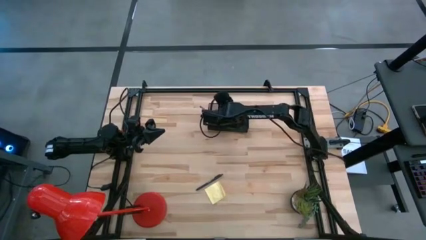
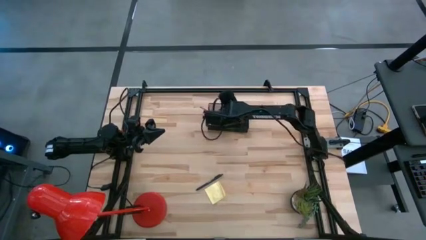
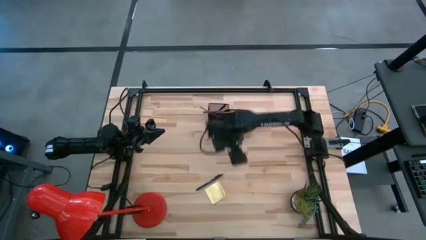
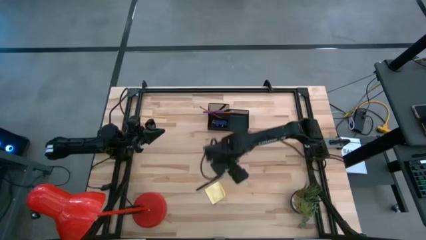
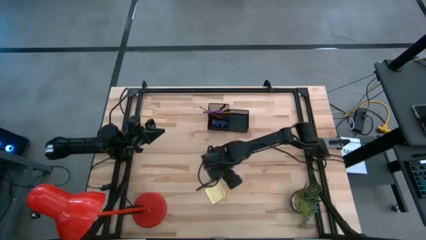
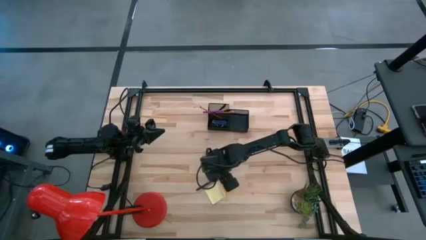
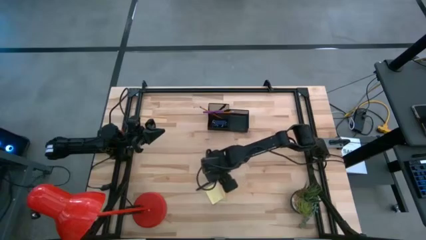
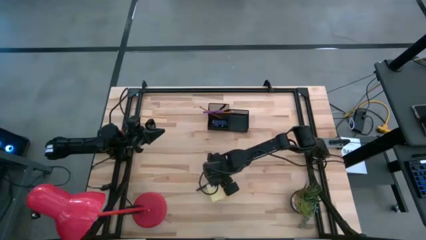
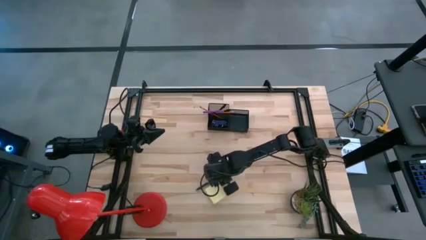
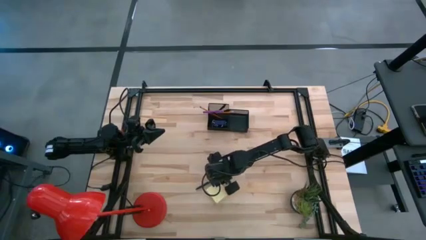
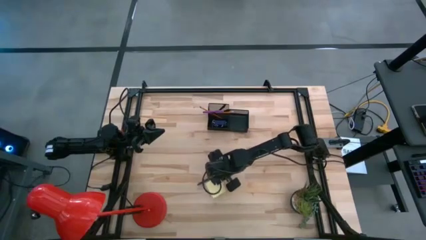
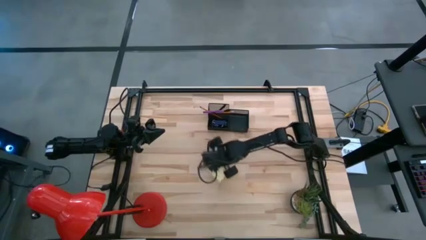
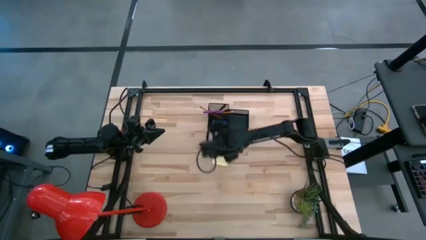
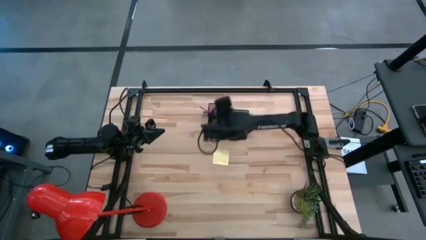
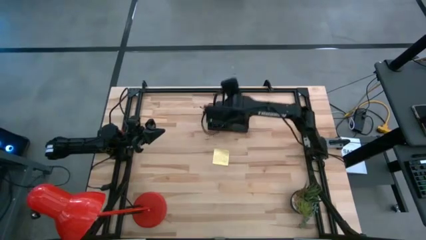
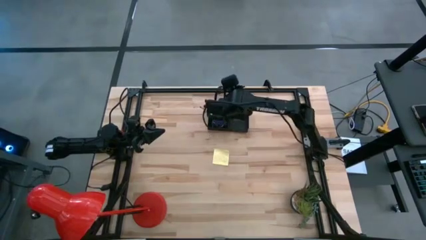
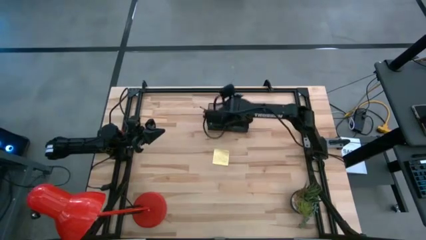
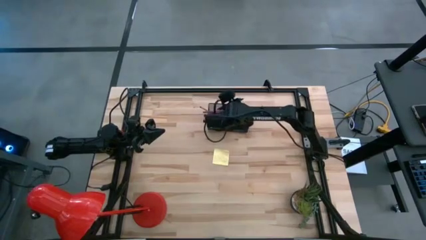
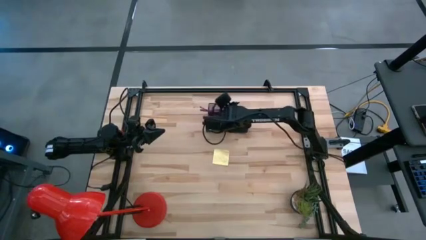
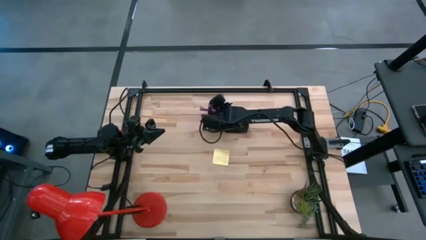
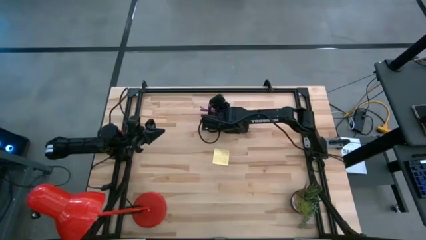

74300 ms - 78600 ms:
Task: Pick and place office supplies into organizer
Put the black pen into the desk organizer

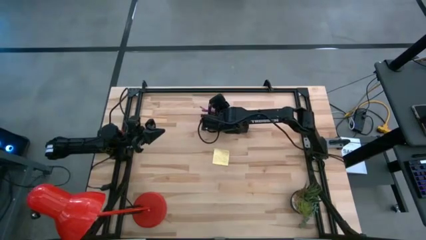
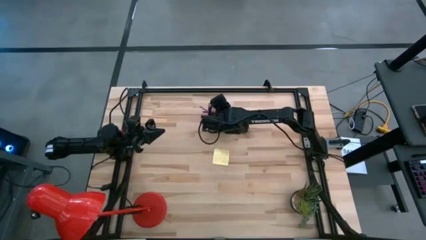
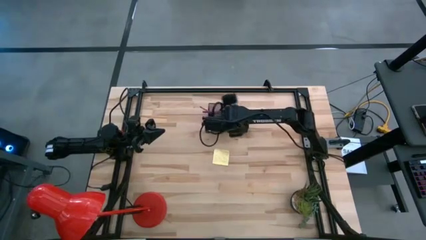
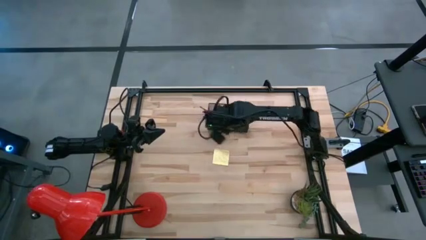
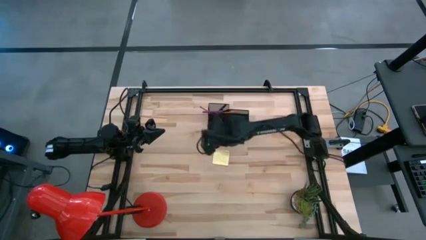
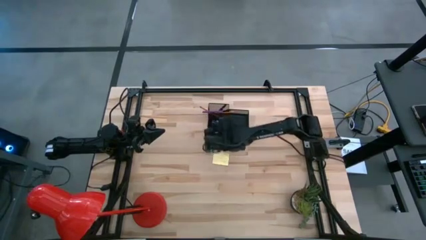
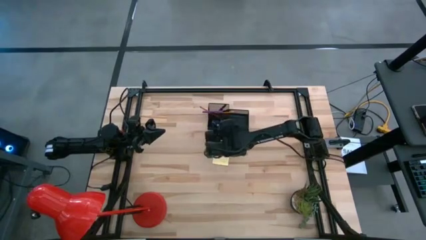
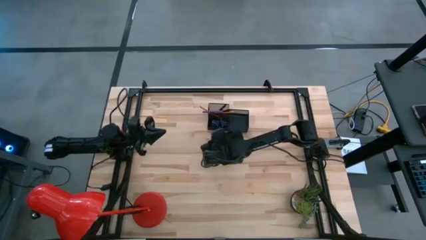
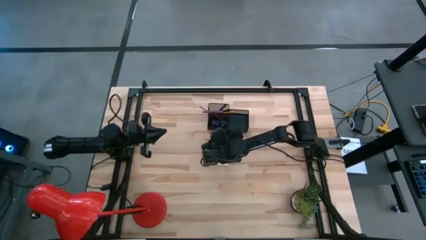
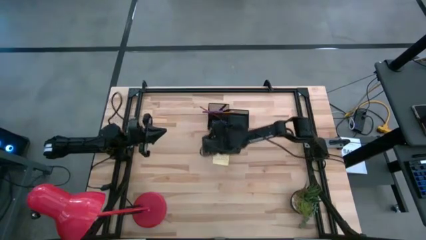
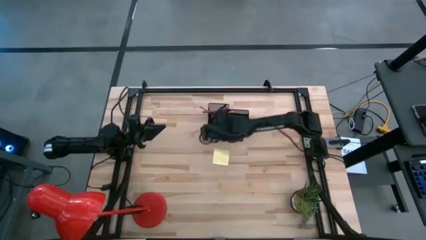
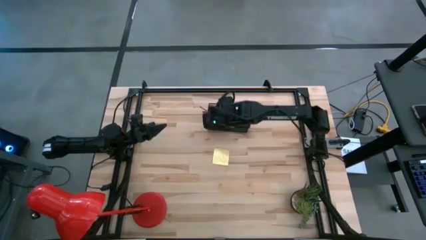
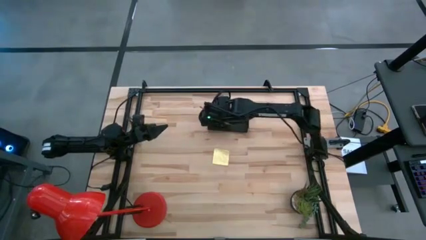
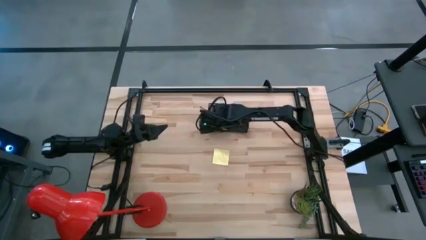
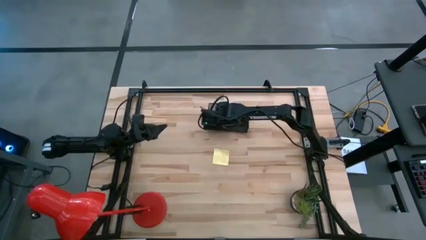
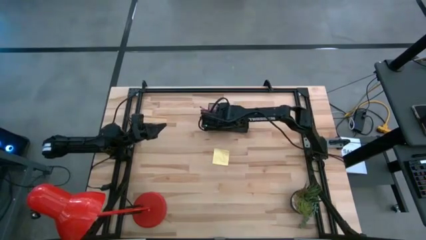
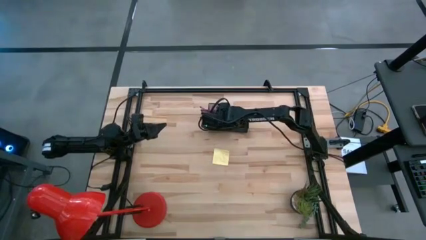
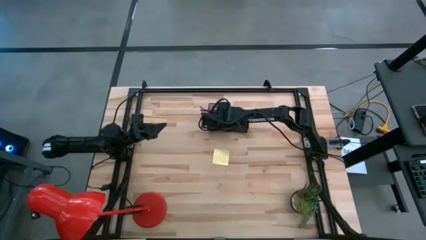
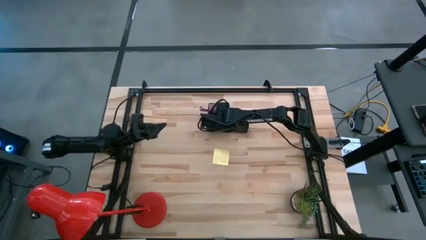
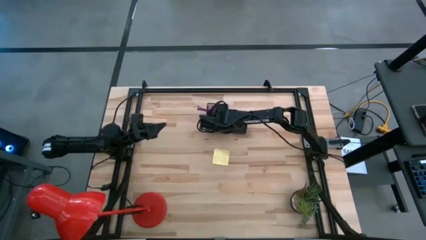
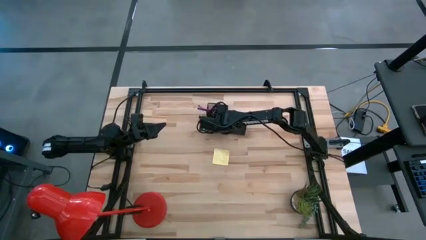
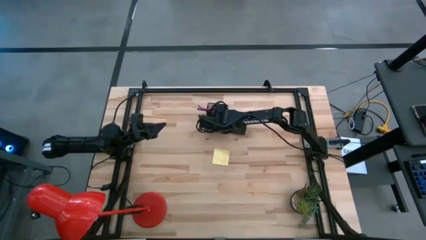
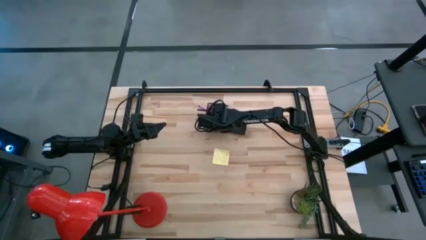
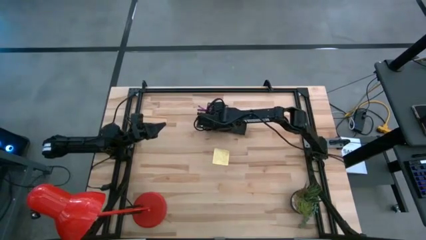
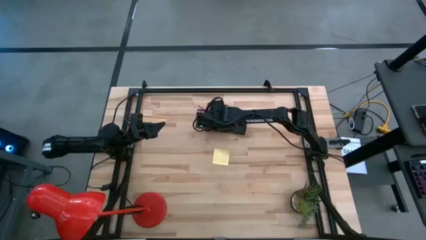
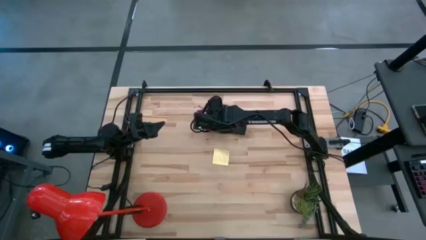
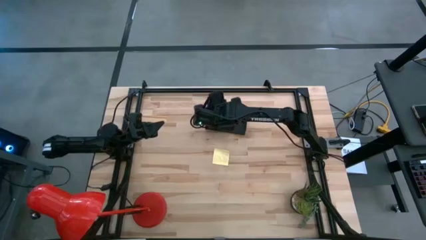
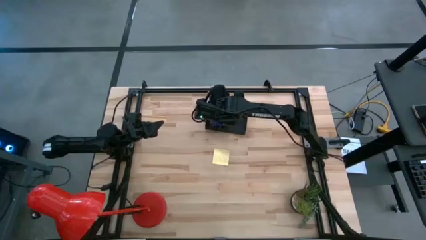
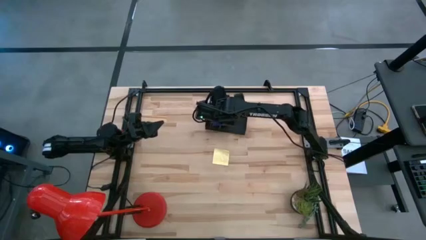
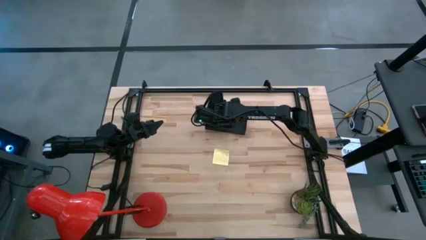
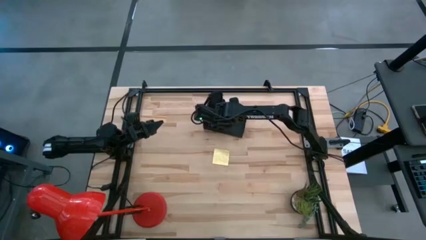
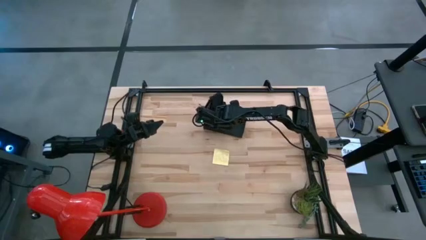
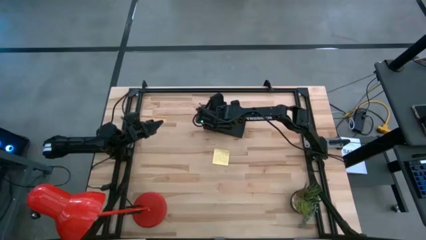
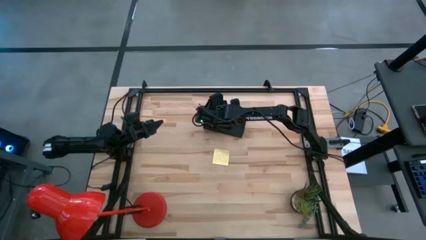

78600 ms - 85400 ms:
Put the black pen into the desk organizer

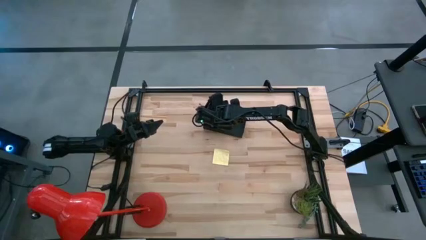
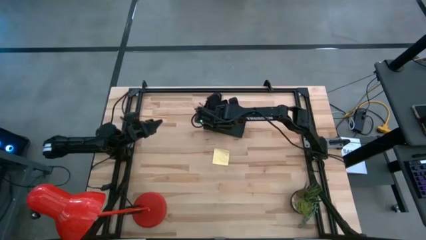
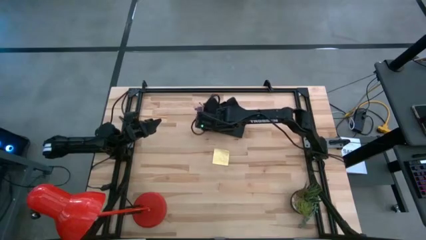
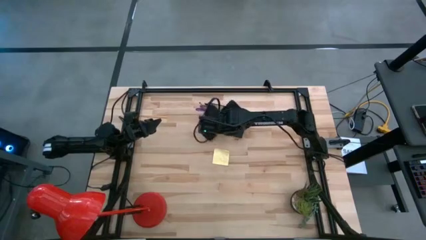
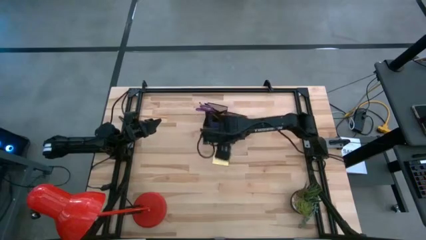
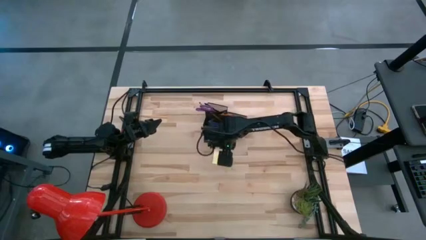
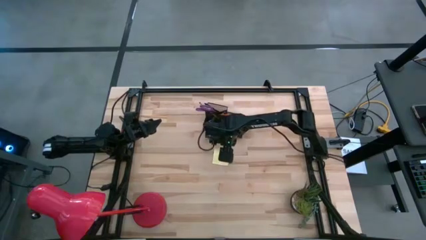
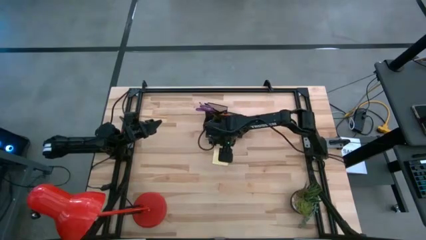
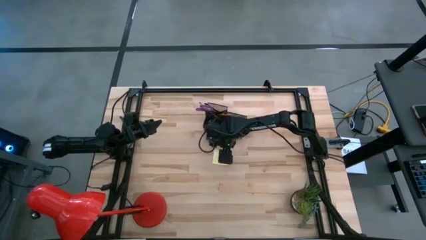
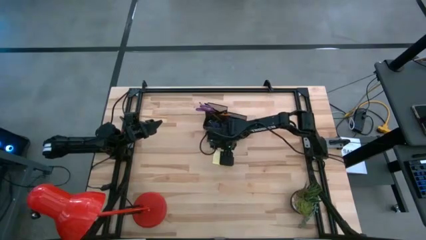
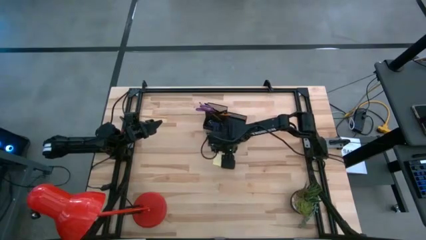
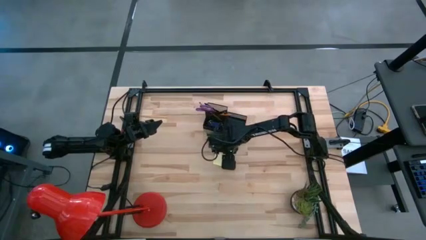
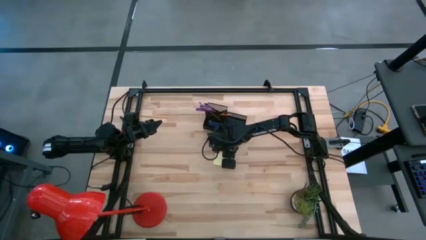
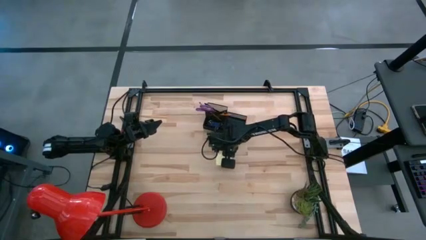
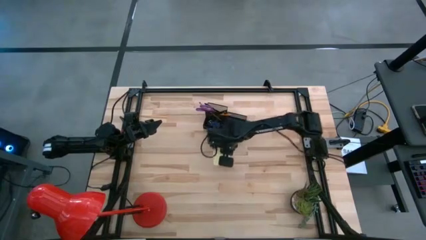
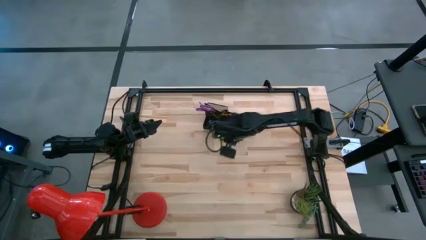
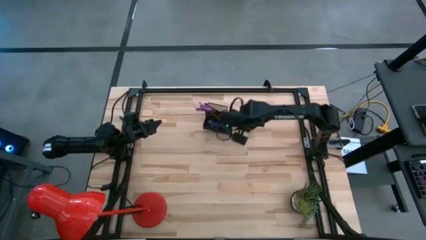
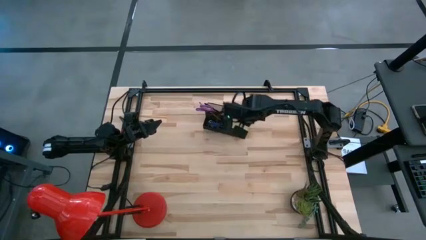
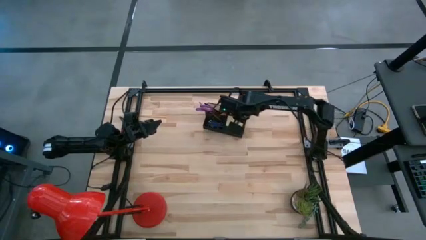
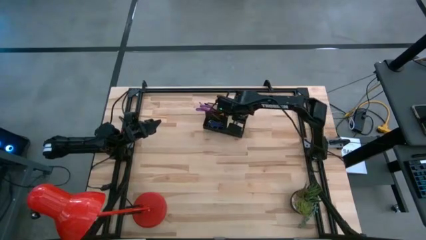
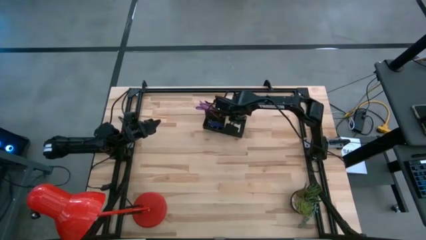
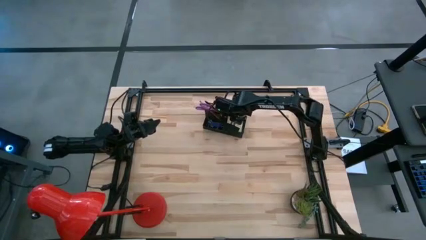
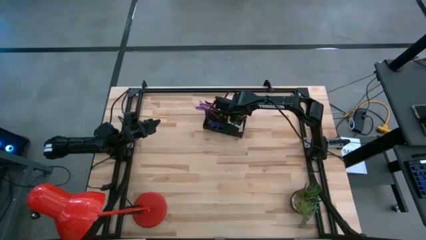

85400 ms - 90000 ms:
Put the yellow sticky note into the desk organizer

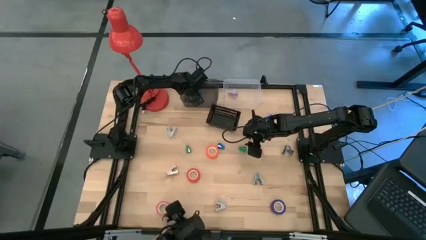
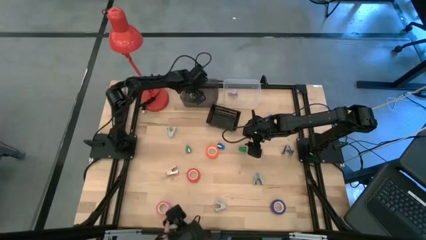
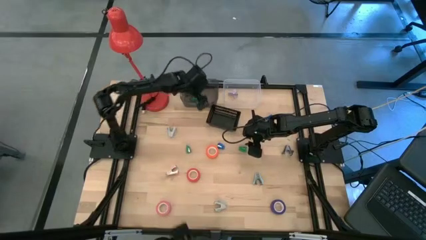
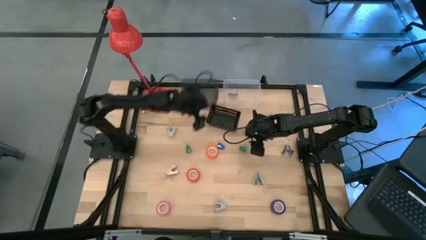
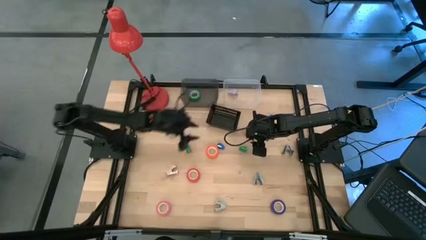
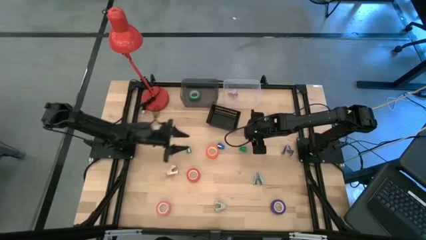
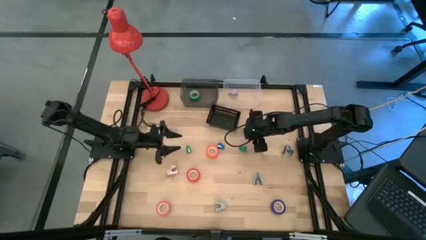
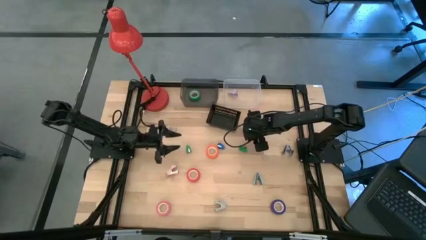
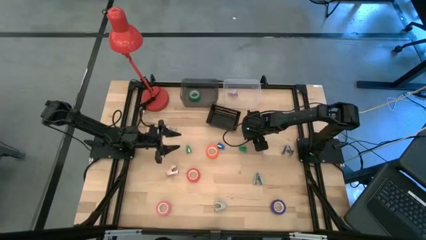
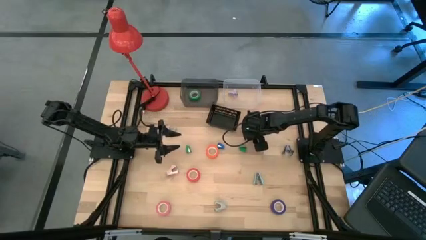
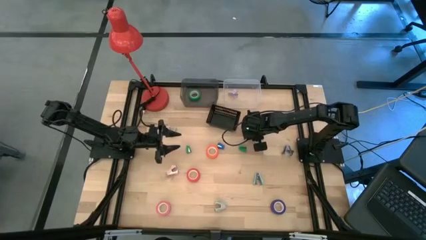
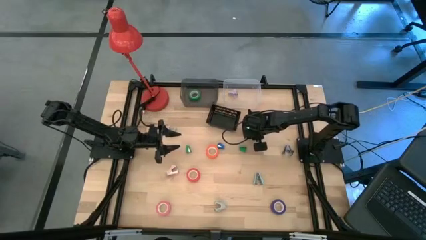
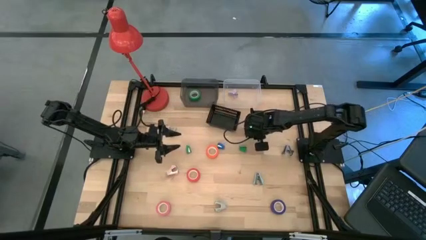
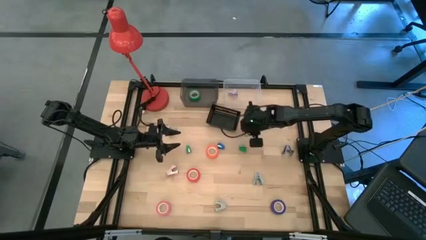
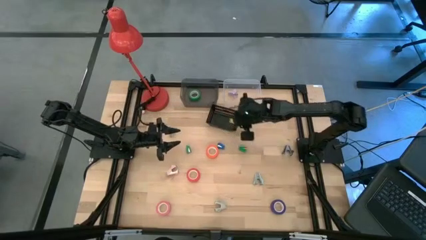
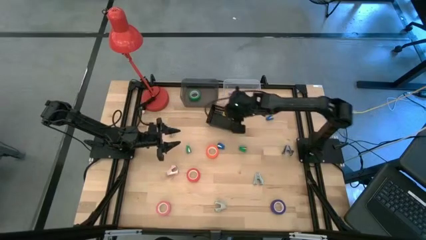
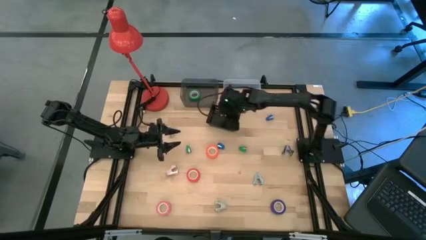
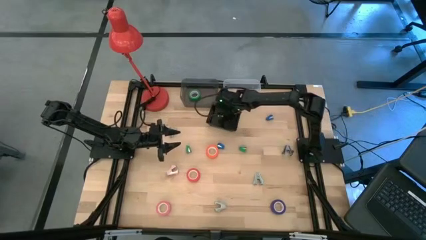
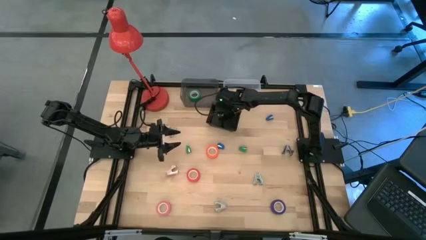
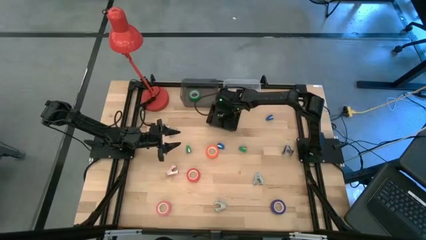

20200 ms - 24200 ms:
Task: Pick and place Stapler, Stapler remover, tape
Put the yellow mini-stapler into the black bin
